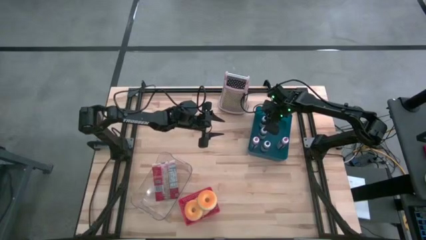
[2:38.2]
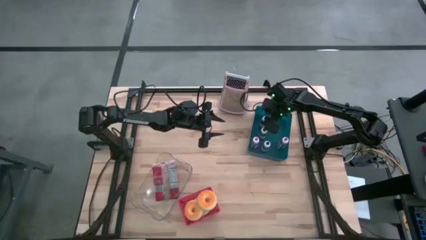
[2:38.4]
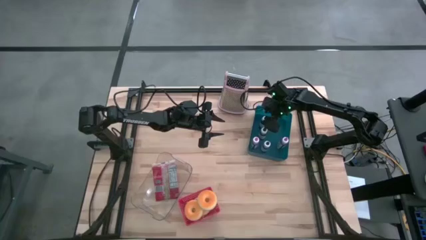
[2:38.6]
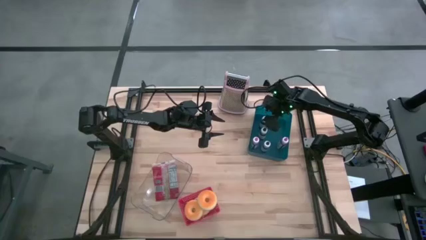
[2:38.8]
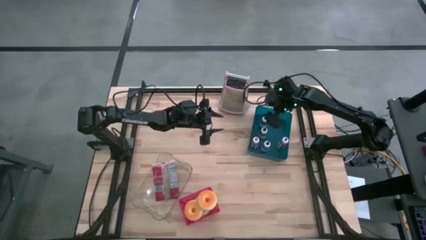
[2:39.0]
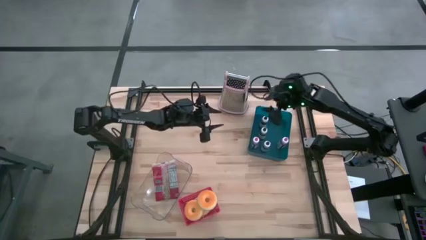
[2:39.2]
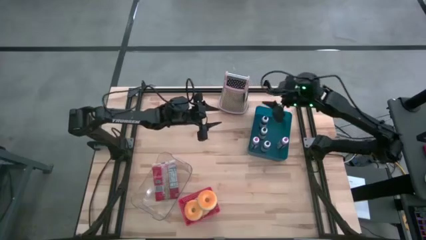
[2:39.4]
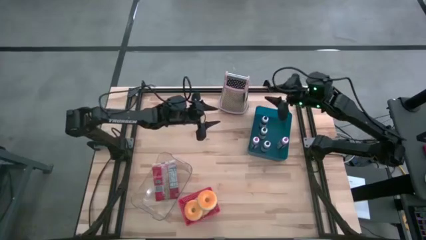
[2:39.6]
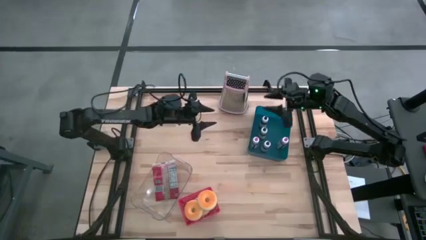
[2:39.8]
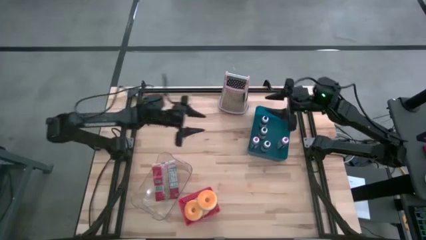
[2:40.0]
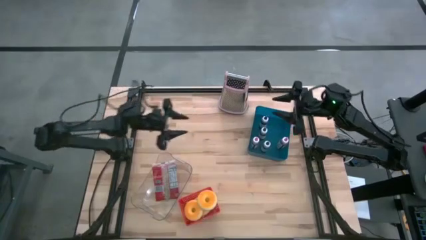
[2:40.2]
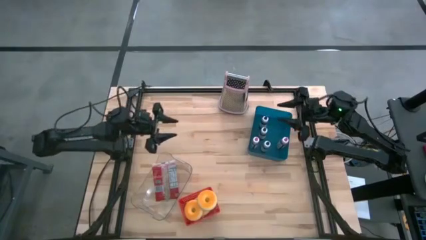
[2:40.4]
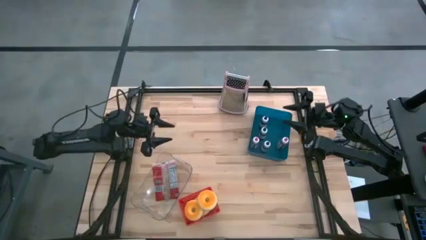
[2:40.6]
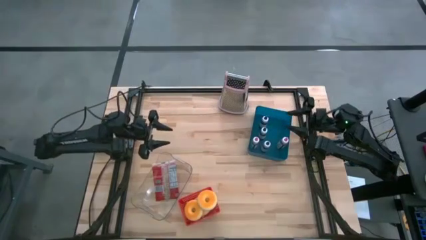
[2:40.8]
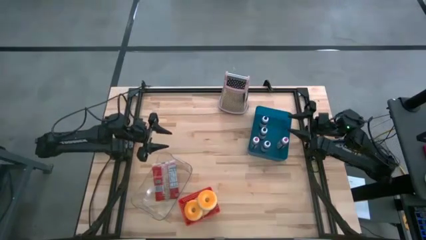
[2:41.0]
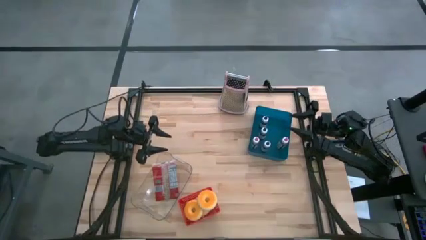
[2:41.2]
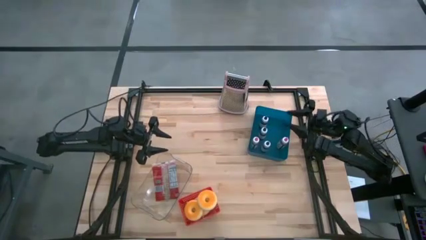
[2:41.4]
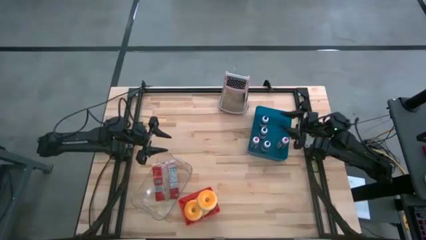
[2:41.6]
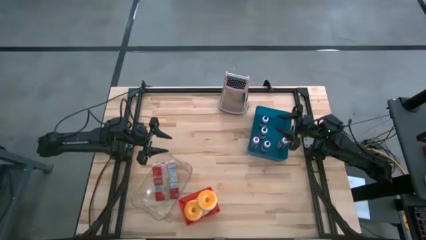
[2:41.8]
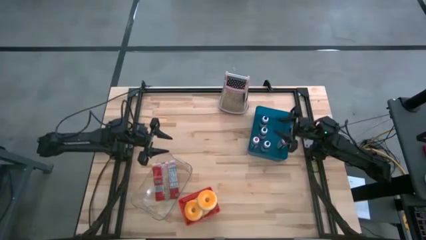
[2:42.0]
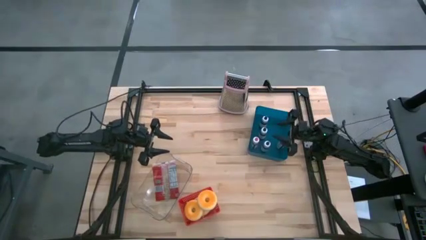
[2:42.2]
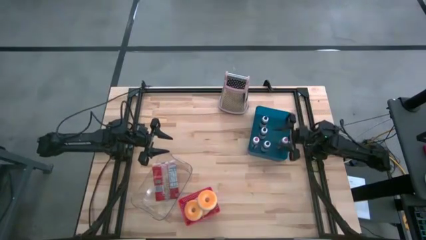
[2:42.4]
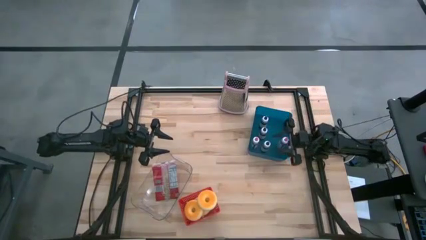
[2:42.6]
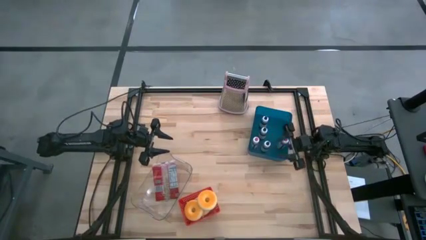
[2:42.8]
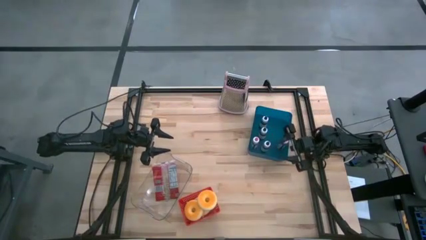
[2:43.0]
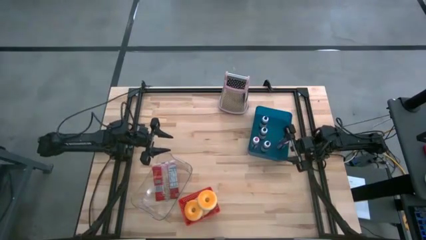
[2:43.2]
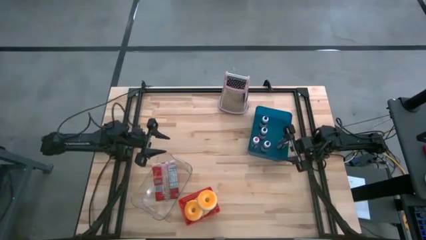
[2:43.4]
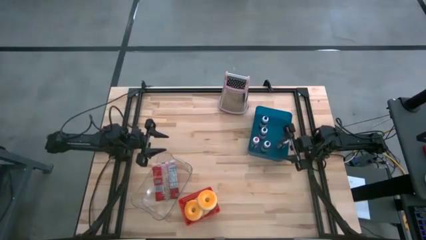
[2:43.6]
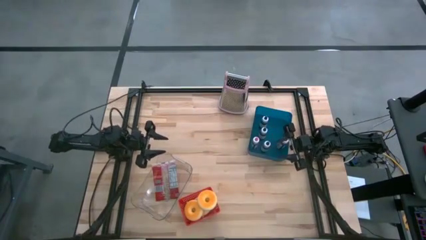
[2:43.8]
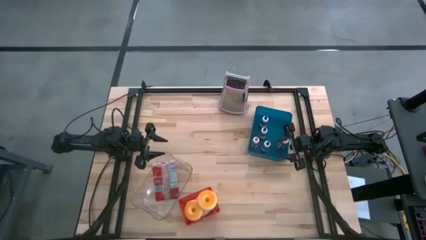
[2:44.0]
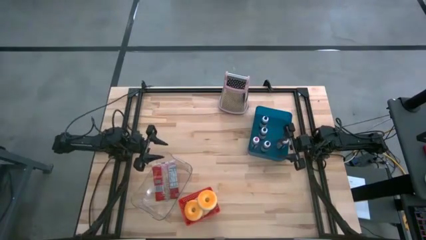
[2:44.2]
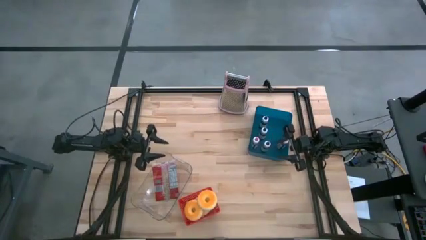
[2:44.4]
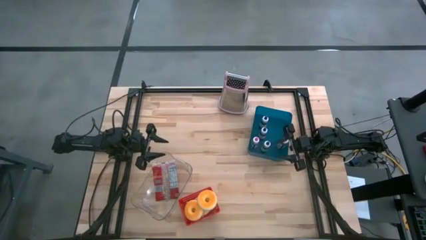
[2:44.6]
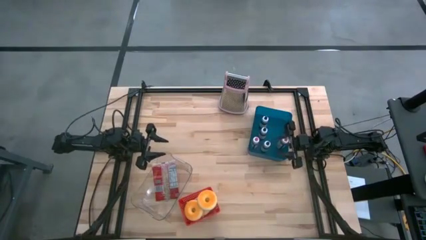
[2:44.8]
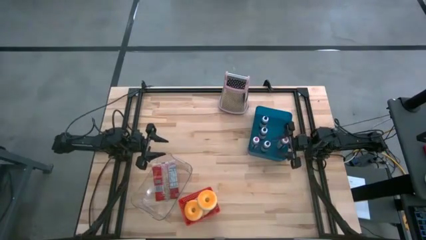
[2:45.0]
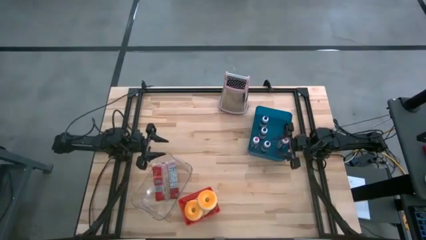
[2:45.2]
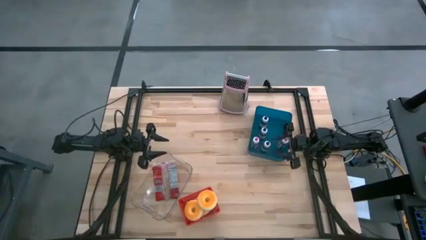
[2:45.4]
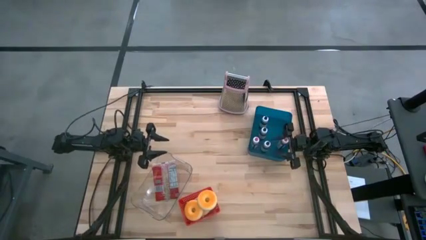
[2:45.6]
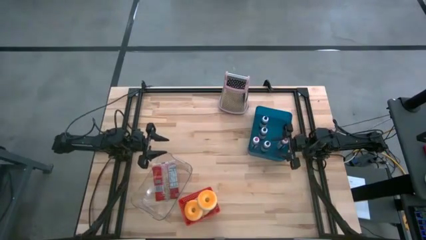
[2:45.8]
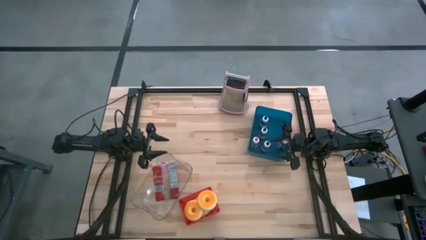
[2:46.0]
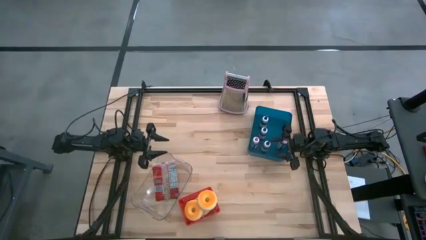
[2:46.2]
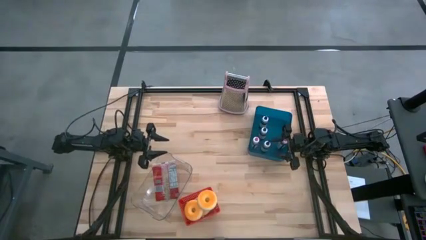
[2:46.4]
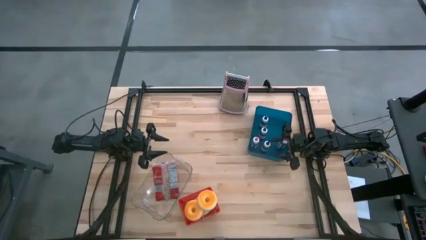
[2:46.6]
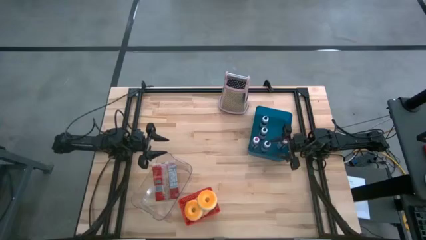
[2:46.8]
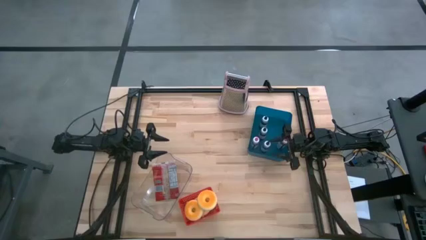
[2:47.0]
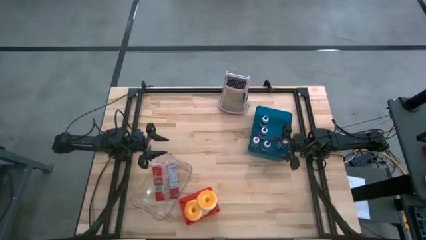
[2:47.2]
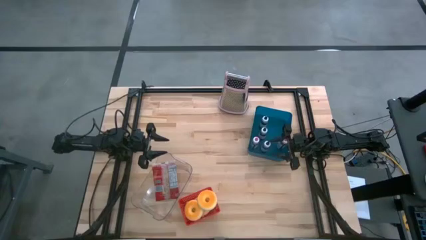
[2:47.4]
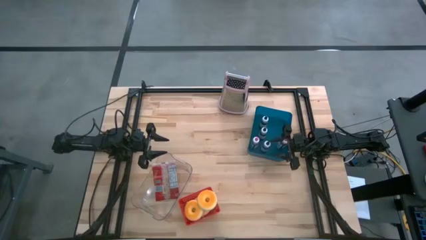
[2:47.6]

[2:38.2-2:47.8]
Task: Pick & Place Food Item
Return to Home Position
